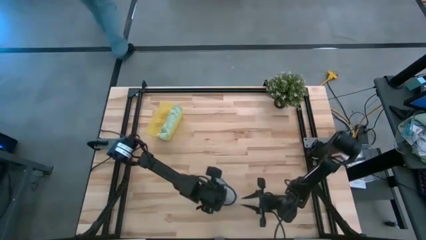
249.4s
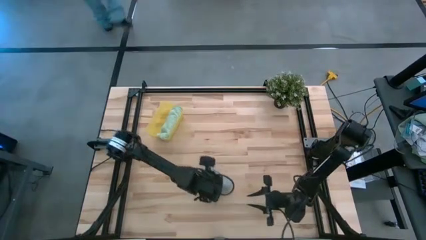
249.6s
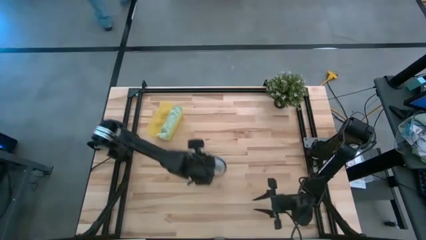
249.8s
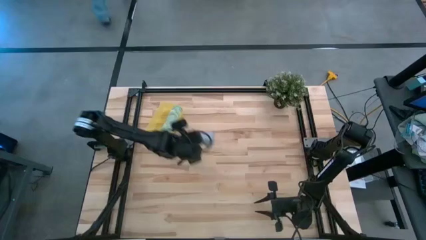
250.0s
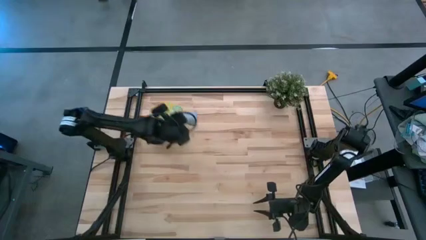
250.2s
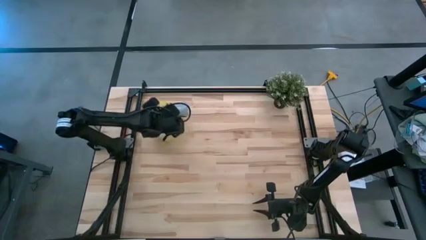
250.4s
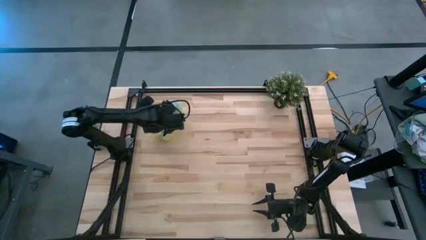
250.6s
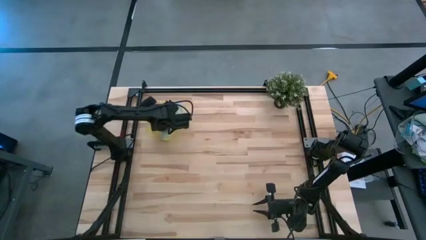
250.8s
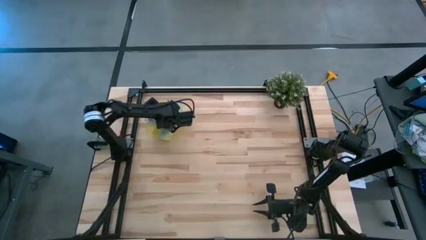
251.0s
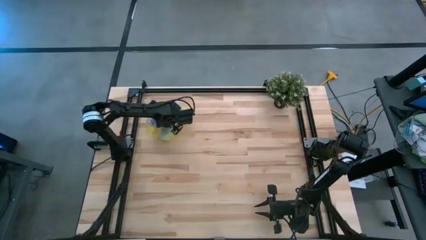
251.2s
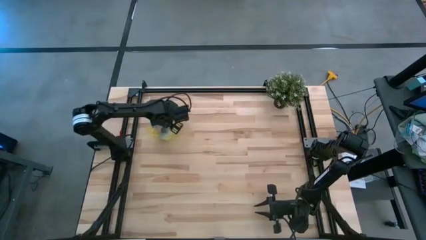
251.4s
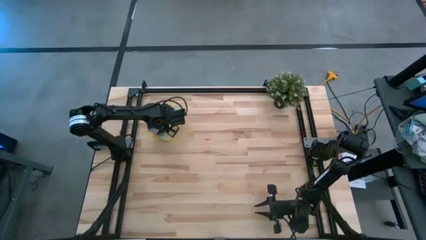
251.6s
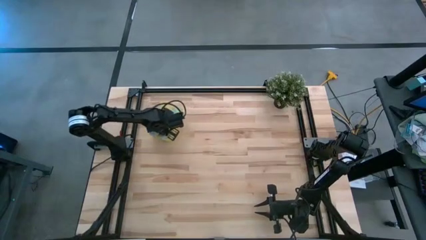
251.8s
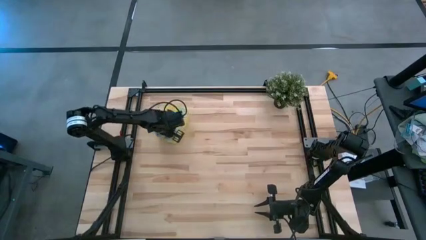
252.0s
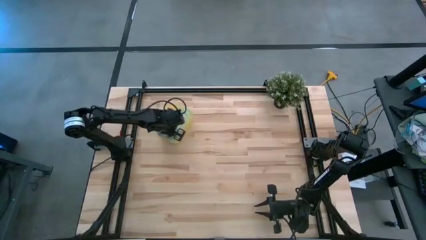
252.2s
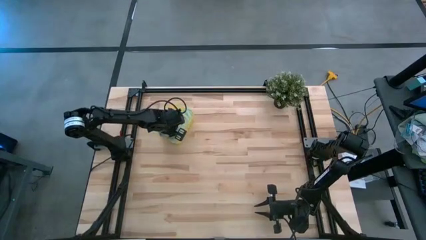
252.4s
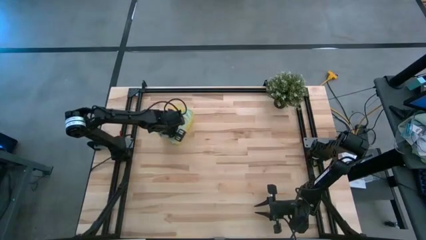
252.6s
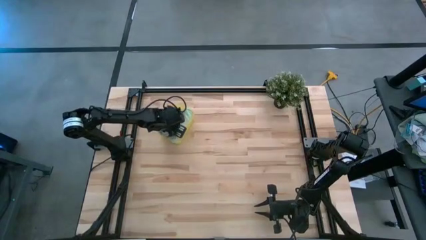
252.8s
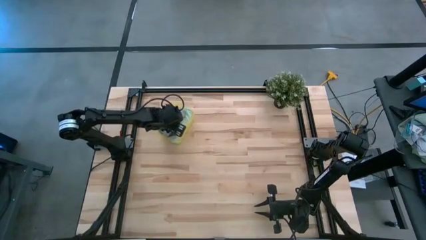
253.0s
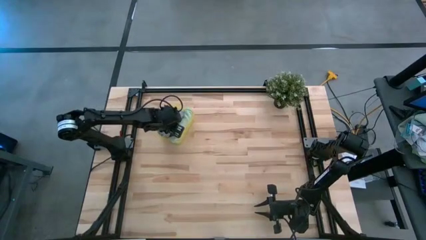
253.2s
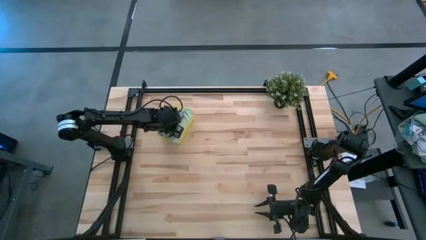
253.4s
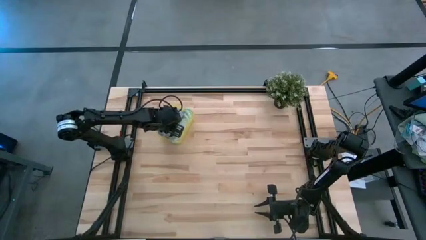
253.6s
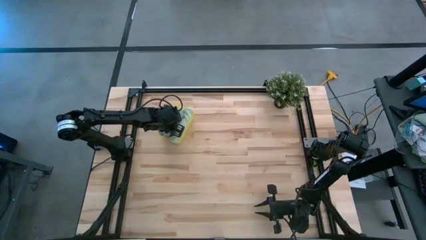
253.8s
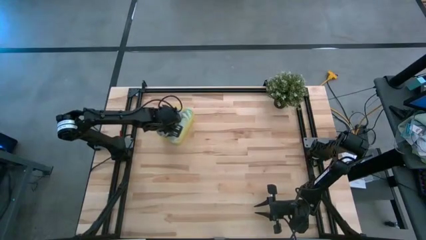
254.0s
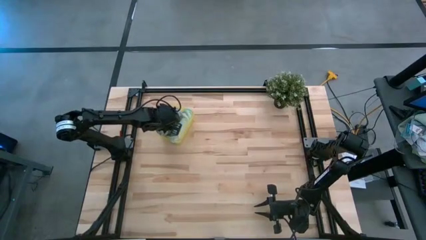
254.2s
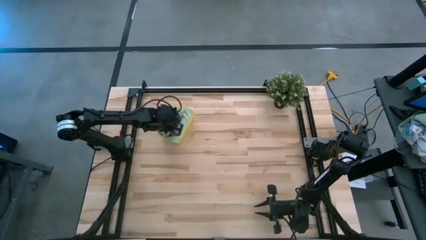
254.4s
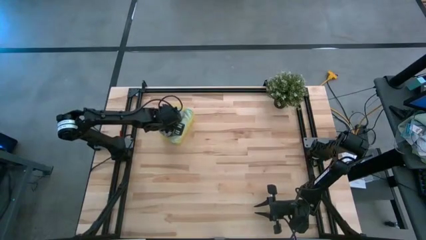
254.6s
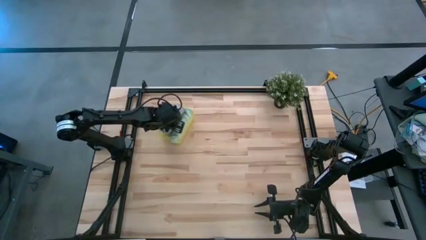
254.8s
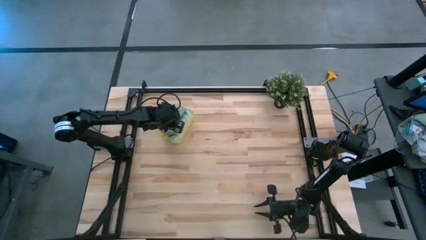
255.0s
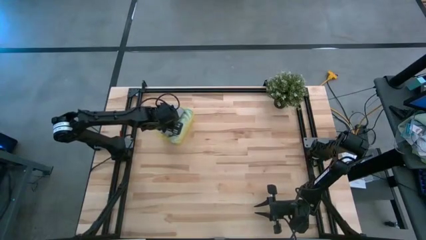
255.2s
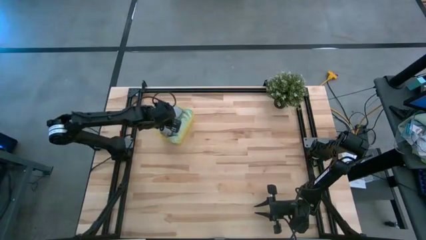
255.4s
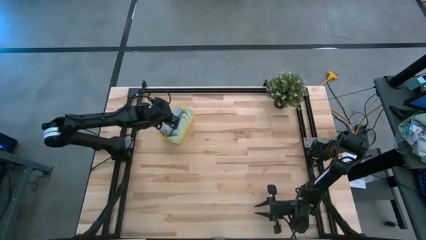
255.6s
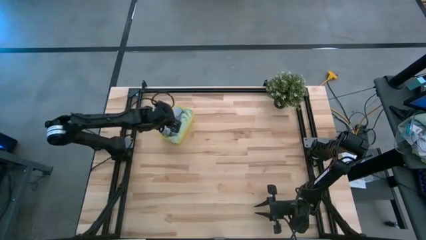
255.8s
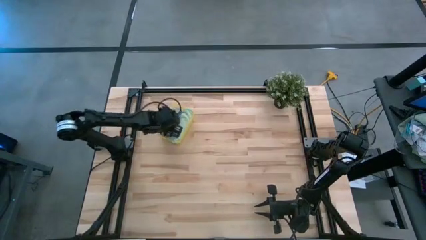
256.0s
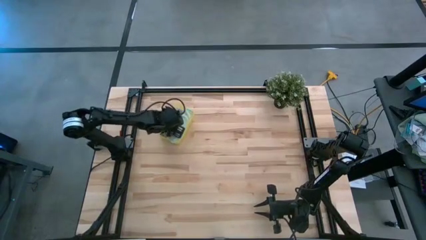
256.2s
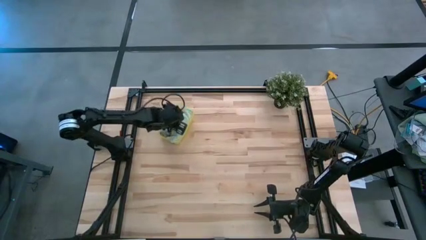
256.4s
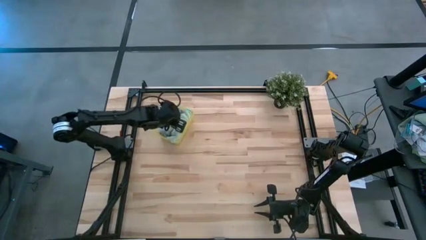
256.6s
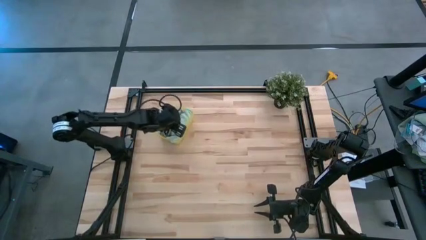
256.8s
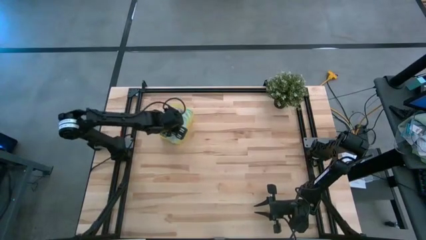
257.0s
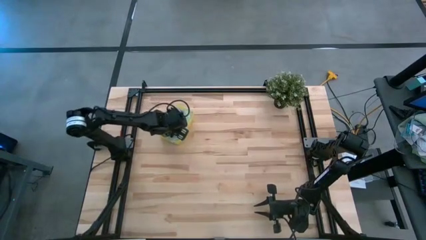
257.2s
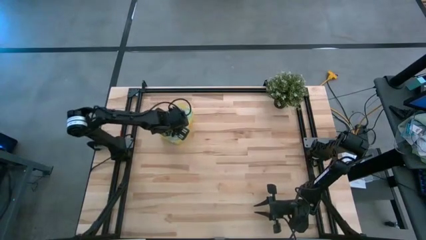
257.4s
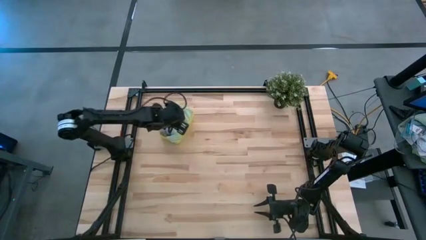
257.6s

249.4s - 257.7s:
Task: Roll microfiber towels into tight, uniform cylinder then place into a basket
Put the rolled gray towel into the yellow bin

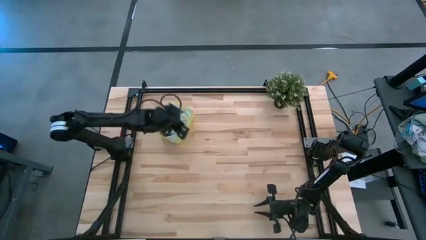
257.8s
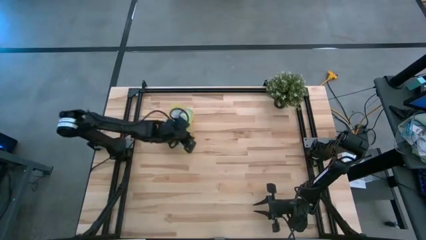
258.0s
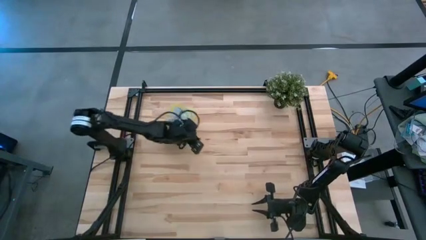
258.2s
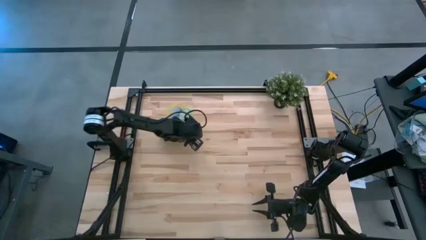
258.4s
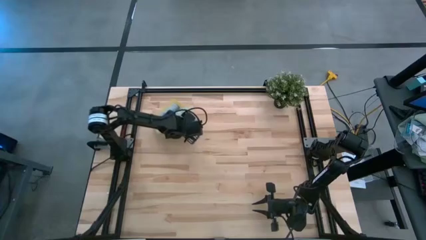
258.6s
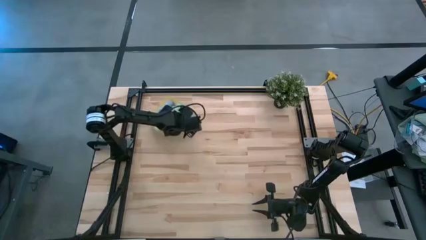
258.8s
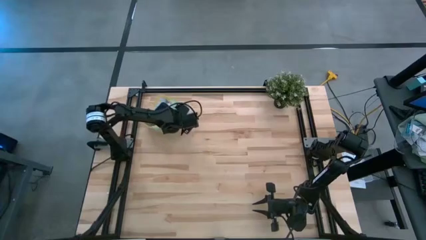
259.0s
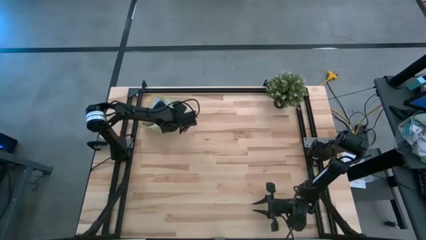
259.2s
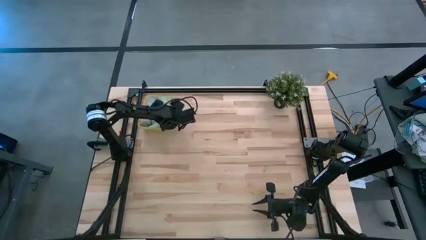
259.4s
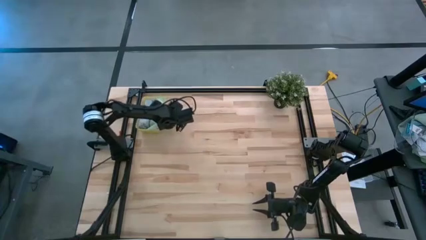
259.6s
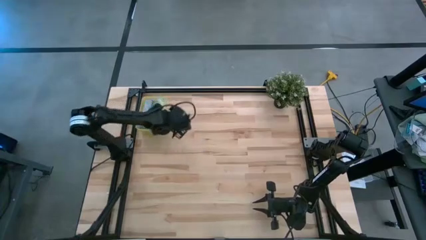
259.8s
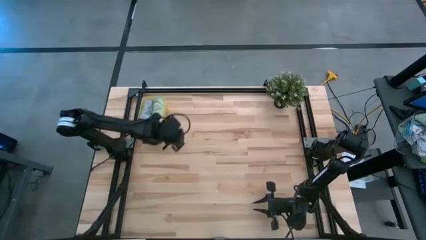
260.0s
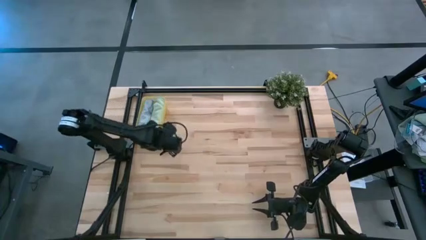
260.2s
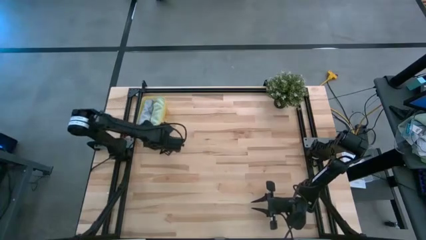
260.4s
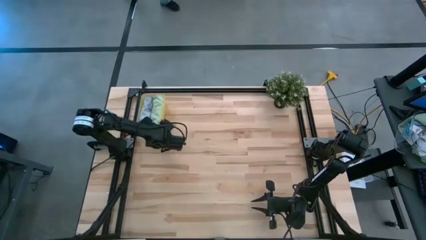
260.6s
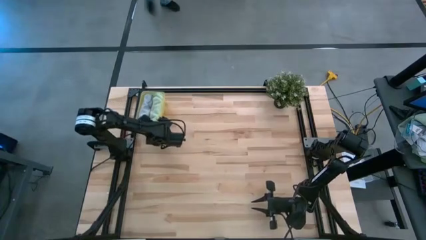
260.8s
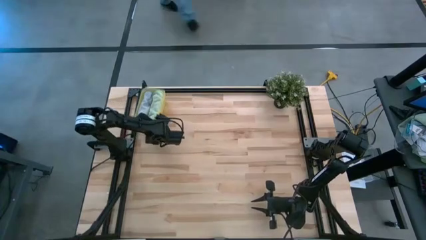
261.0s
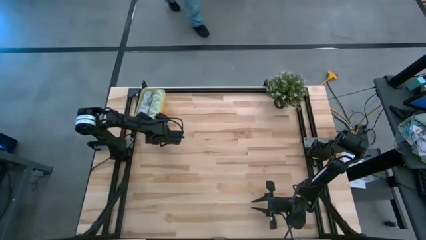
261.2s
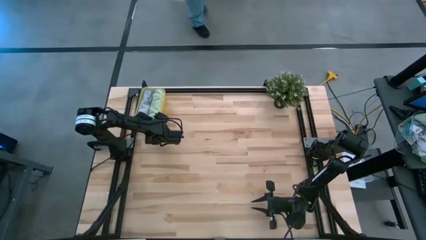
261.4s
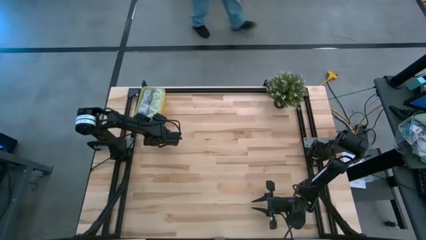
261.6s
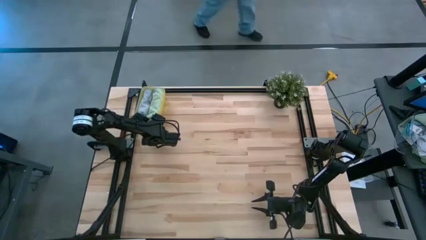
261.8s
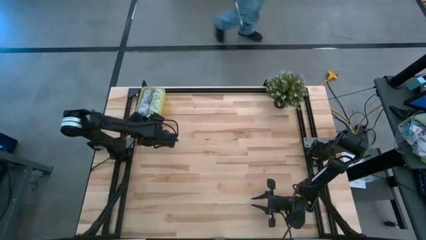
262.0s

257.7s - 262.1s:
Adjust the yellow bin on the table

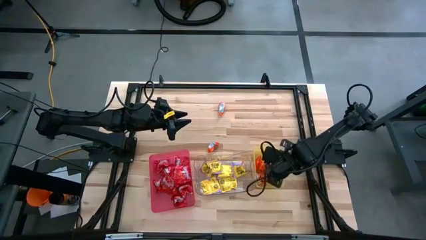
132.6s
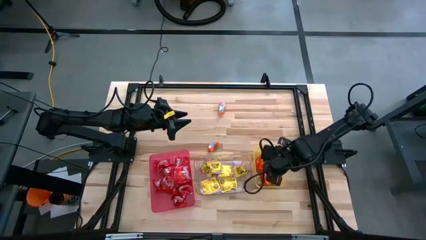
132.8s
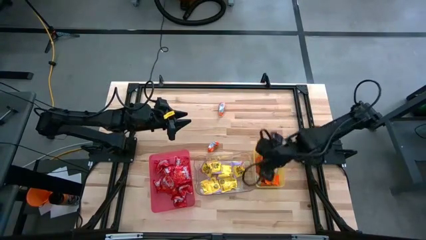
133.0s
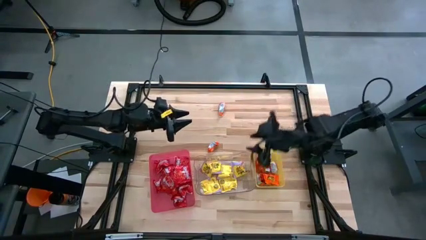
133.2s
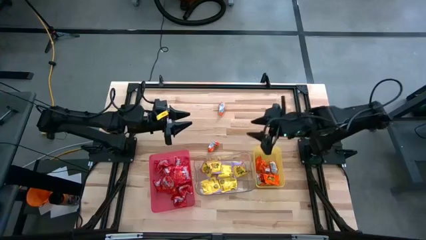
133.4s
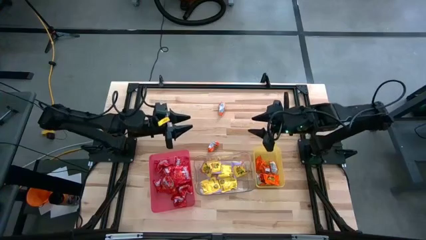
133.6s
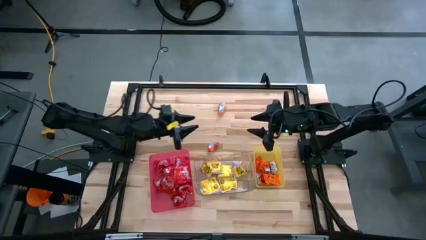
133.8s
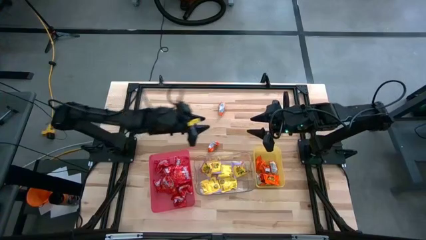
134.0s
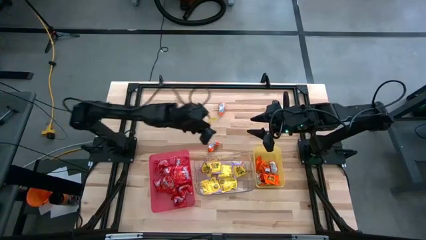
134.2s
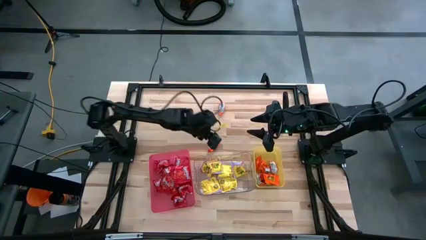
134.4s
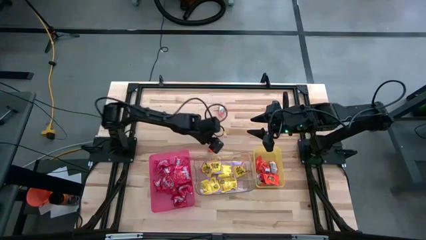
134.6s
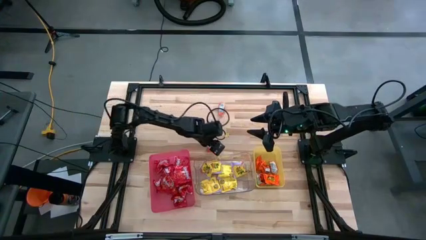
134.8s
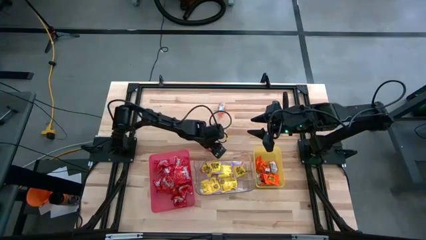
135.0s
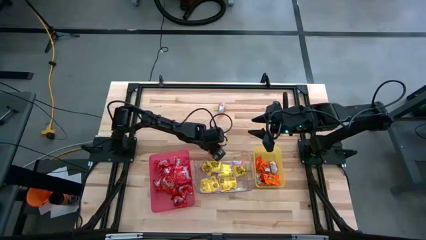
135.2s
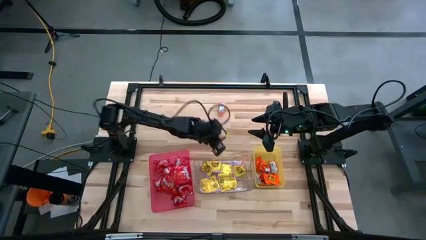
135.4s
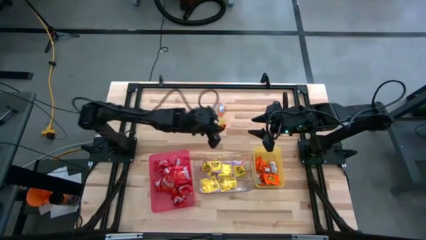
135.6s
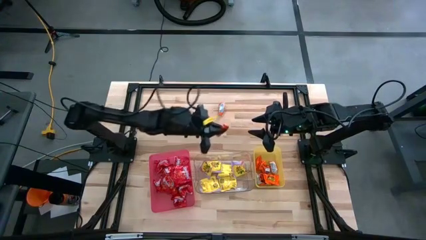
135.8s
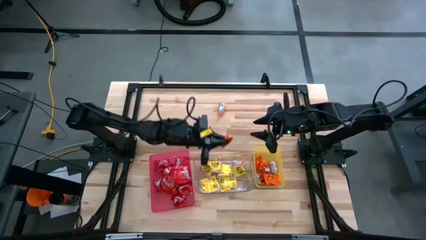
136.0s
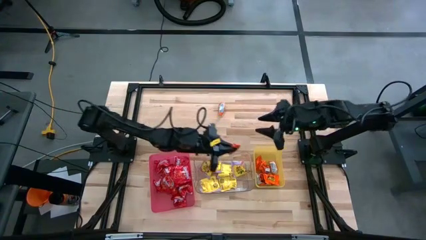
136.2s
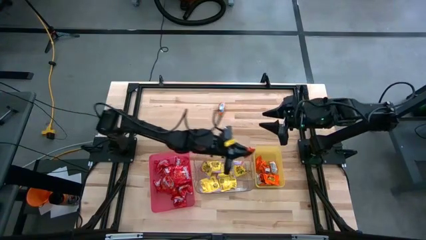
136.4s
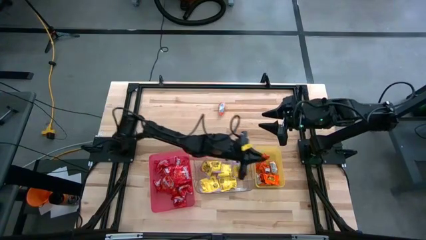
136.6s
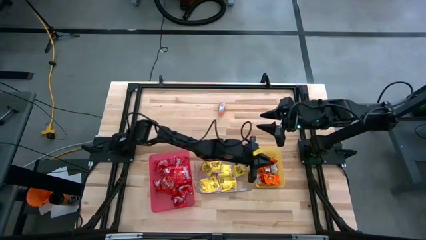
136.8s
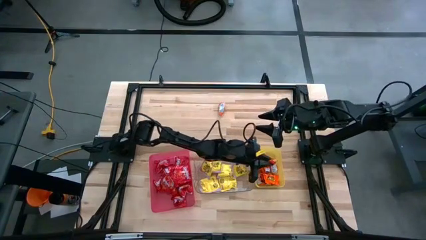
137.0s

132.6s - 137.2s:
Task: Sort candy
Put the orange chocolate into the yellow bin
